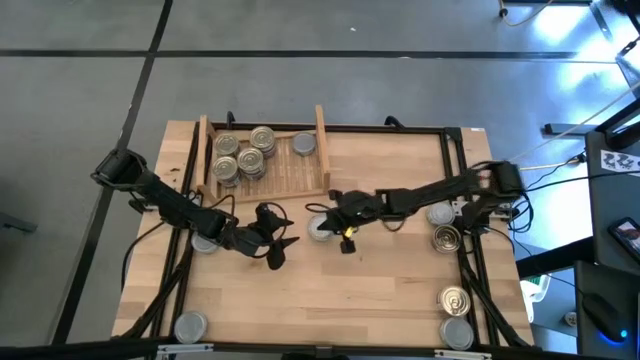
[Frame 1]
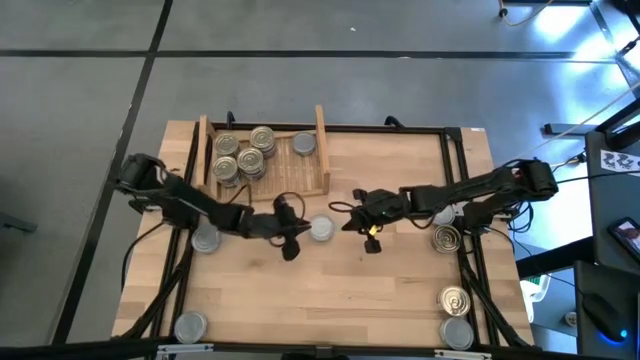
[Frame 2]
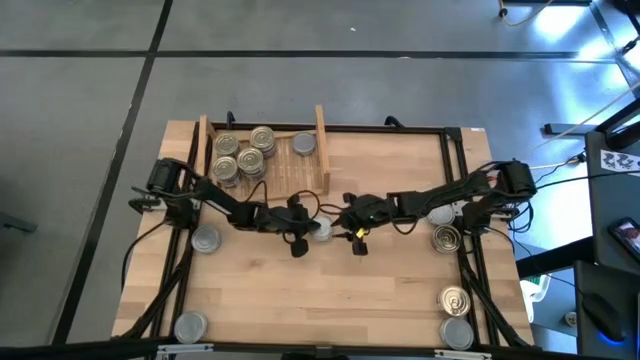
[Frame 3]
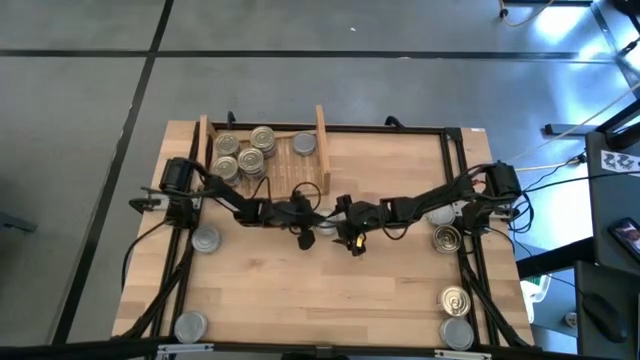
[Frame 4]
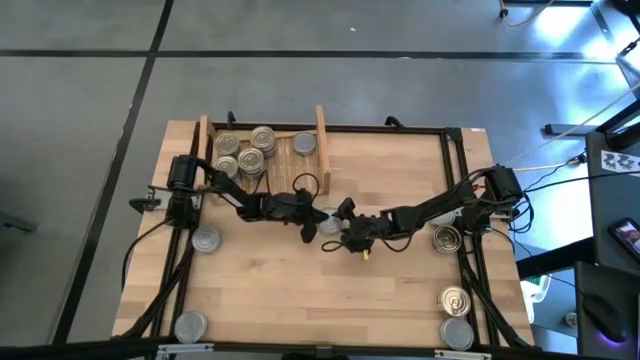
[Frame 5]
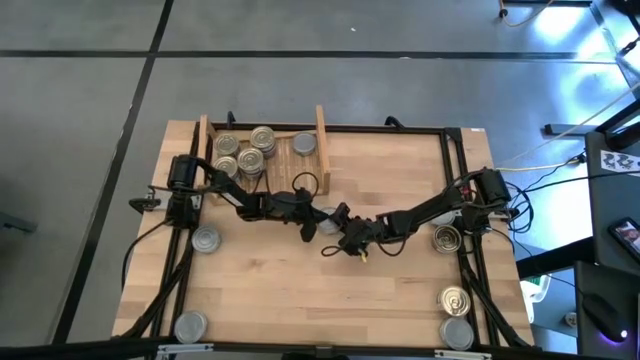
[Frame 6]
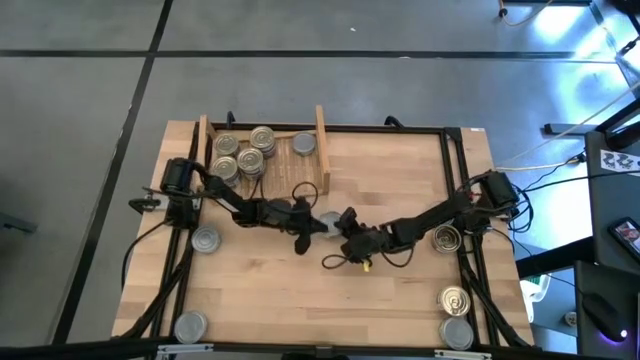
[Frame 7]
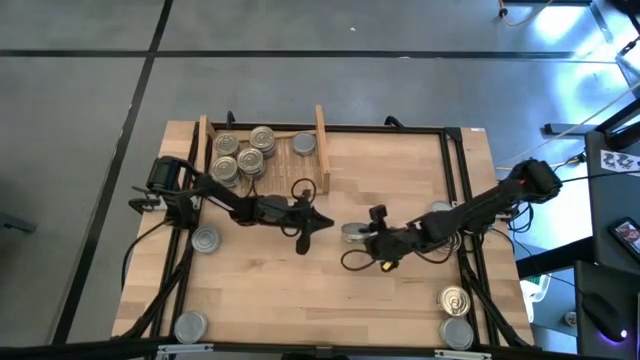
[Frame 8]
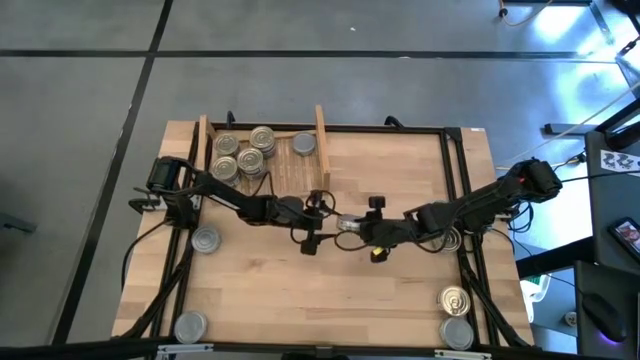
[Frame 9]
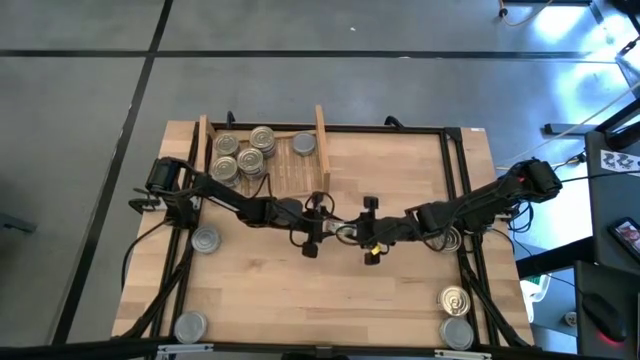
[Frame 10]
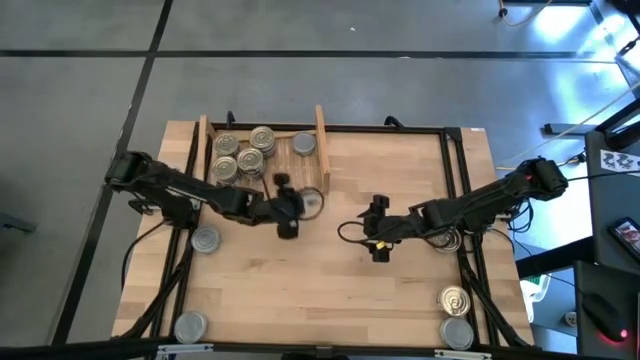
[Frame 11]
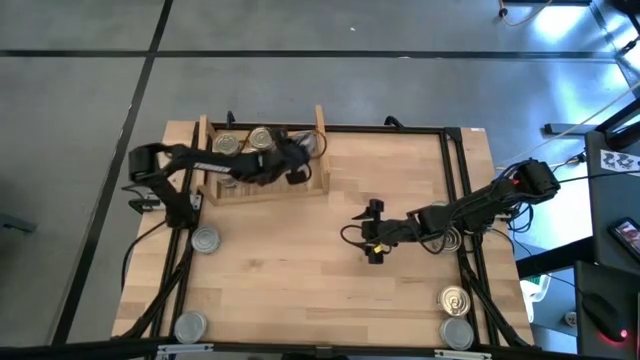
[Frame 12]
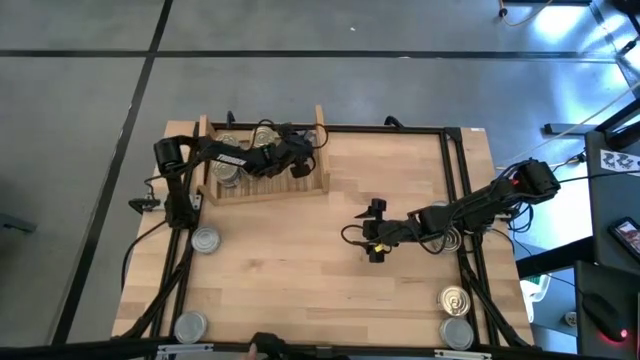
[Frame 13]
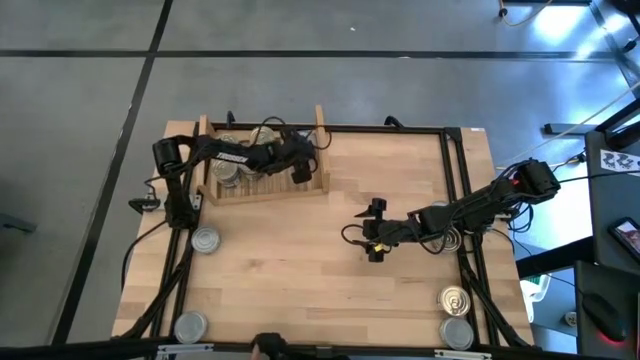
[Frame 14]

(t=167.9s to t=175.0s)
Task: Stack canned seafood by type on shelf
Stack the green tuna can on top of the other green tuna can on the shelf

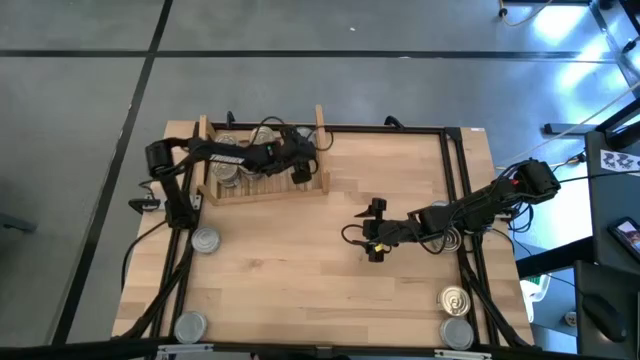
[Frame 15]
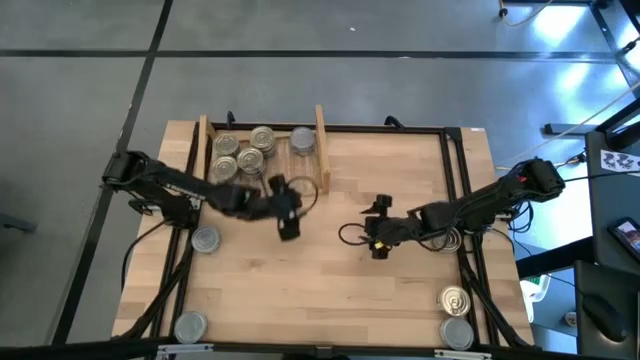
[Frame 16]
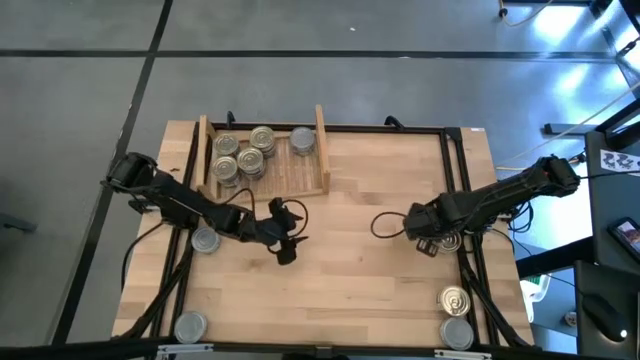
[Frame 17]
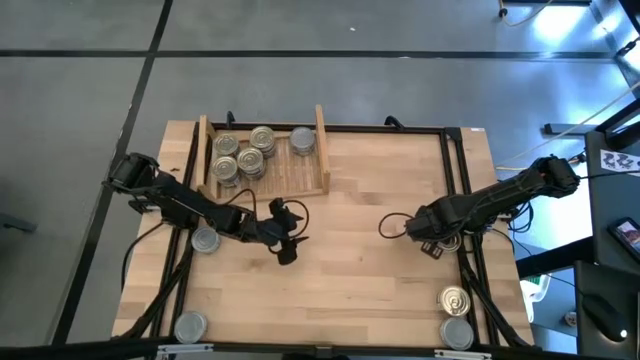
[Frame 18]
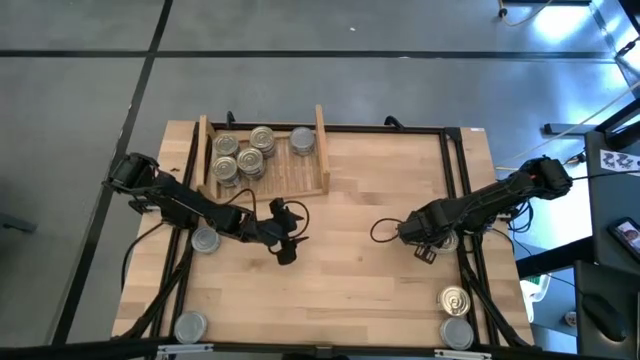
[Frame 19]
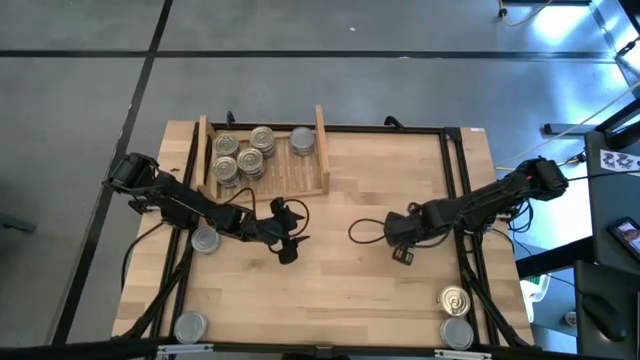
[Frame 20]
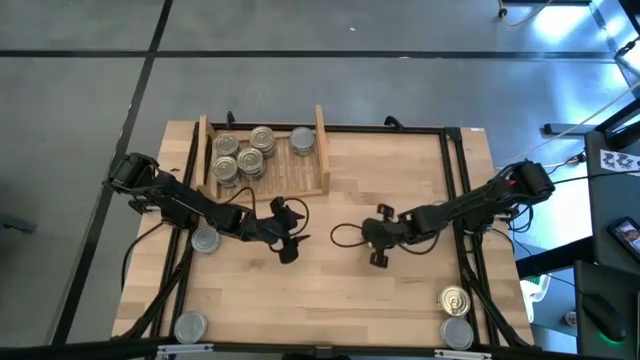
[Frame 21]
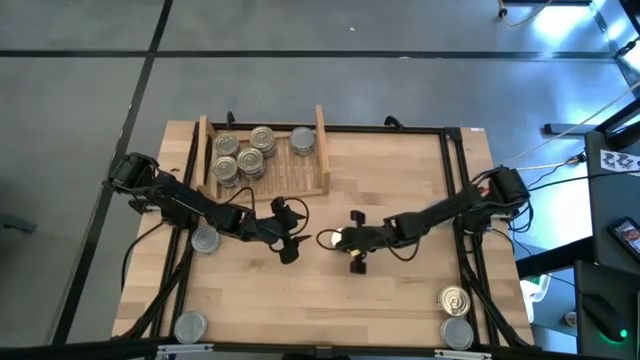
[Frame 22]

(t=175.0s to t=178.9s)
Move the blue tuna can from the middle right to the center

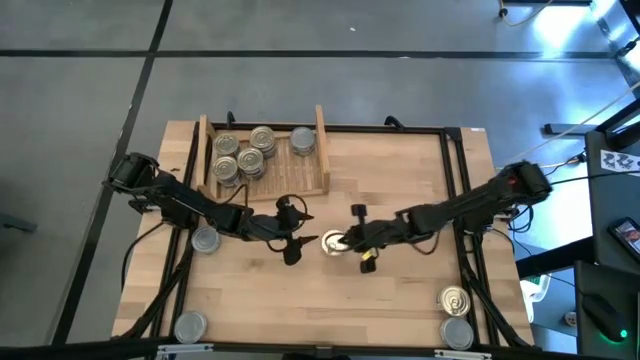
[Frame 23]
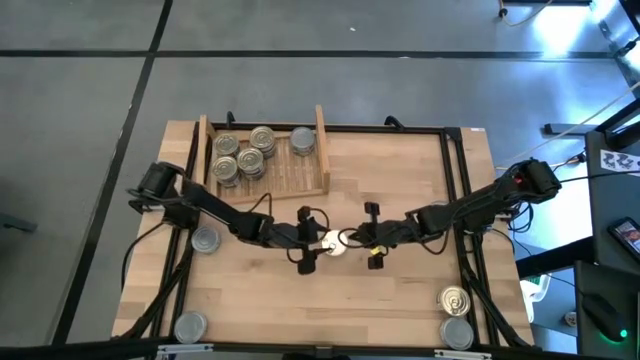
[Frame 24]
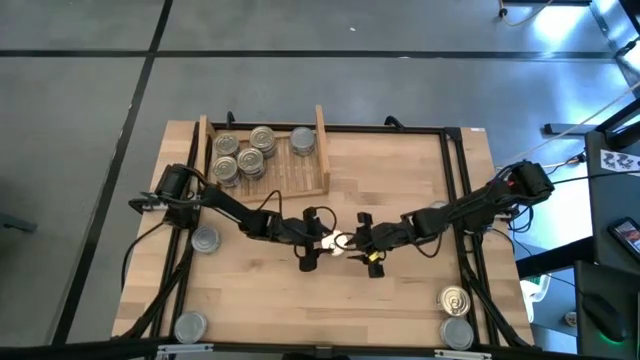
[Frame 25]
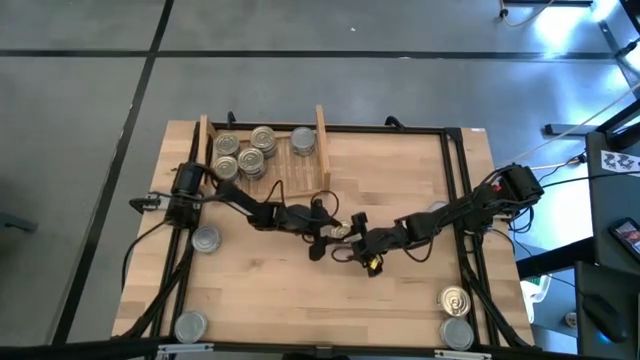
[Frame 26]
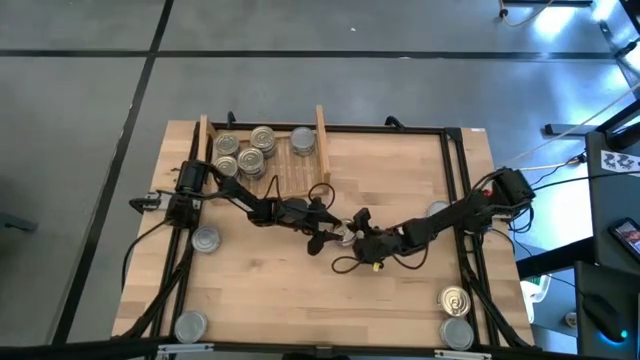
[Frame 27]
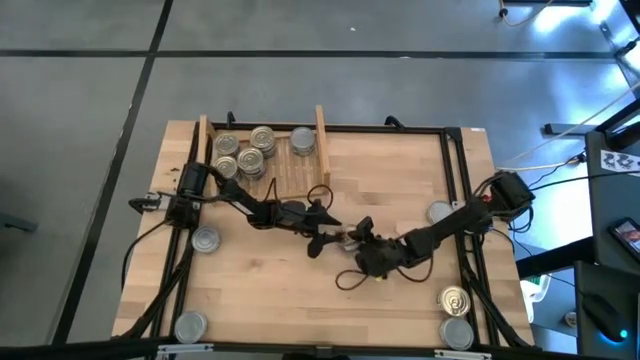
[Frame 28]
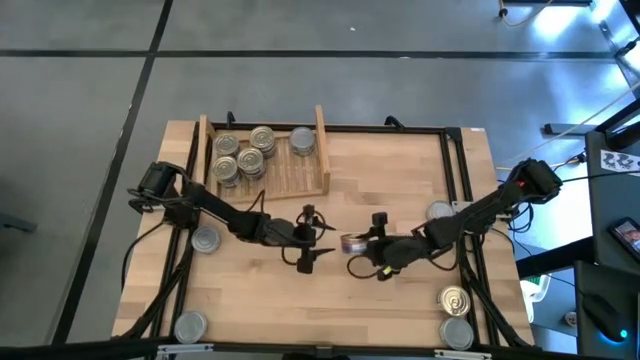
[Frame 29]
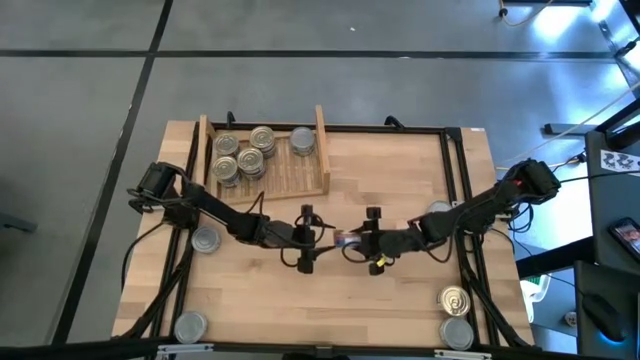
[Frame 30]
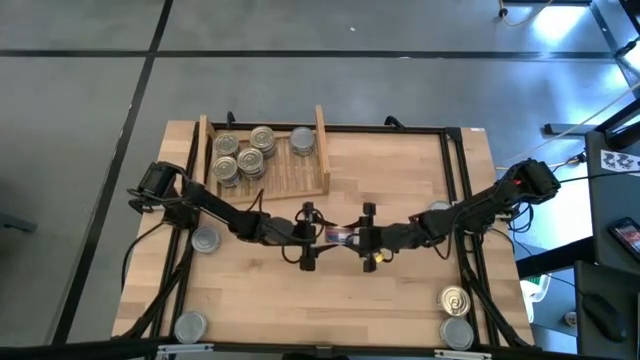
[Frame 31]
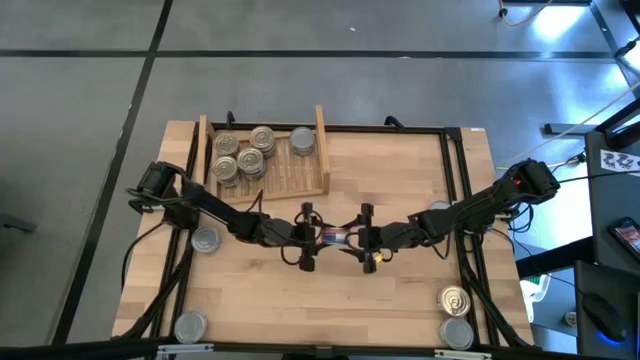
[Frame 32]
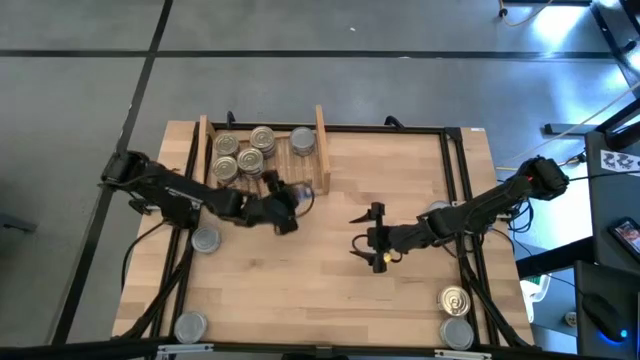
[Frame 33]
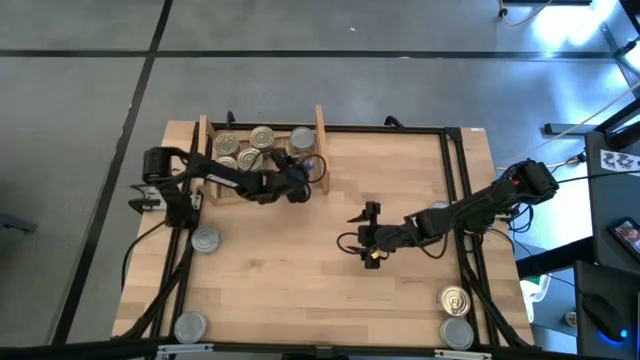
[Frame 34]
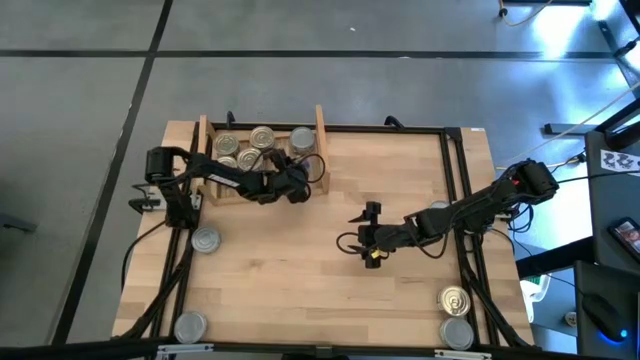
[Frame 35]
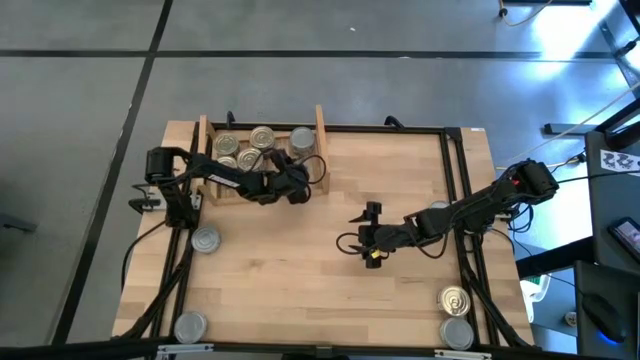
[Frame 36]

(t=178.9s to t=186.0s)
Put the blue tuna can on the shelf

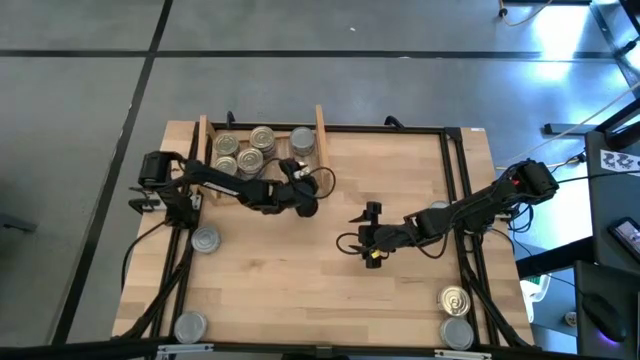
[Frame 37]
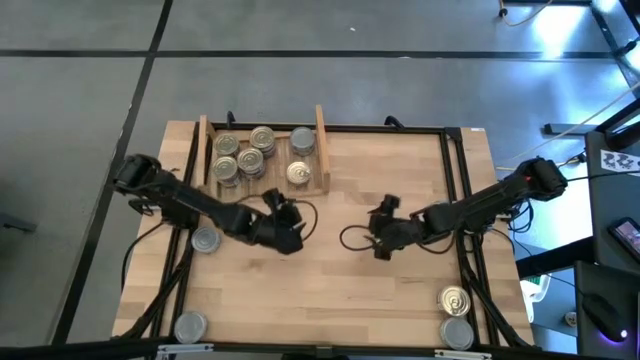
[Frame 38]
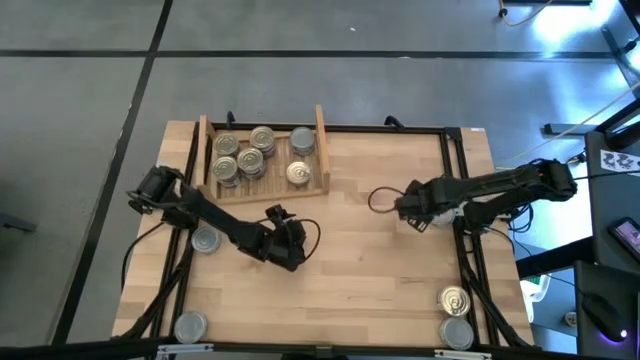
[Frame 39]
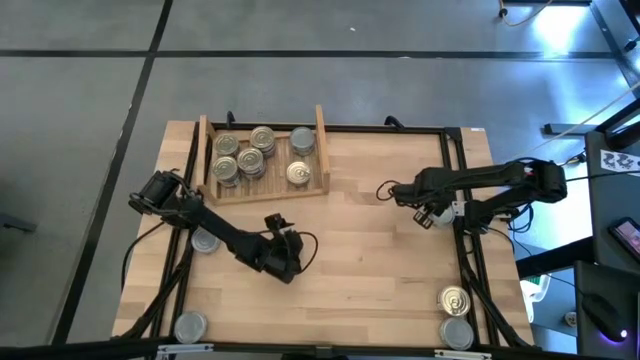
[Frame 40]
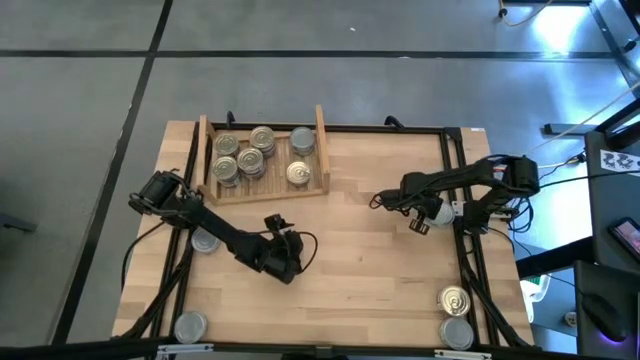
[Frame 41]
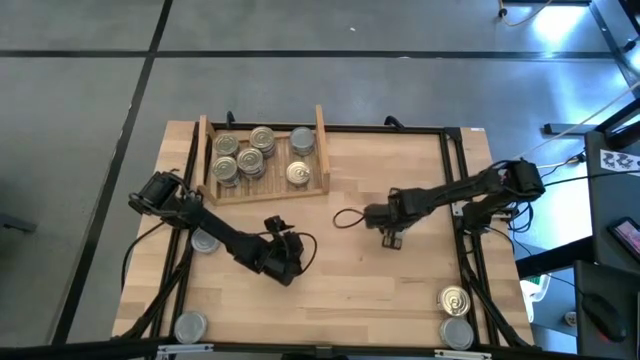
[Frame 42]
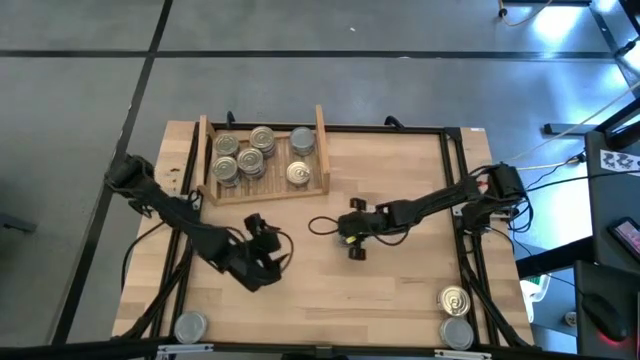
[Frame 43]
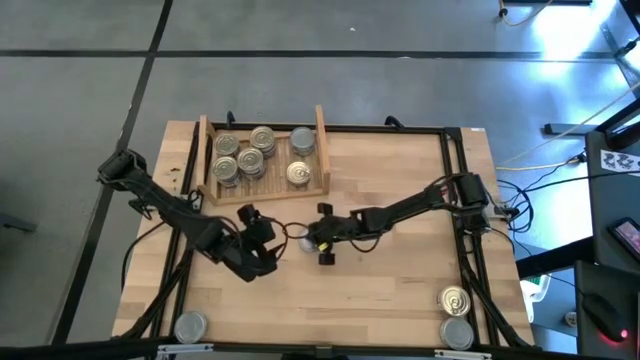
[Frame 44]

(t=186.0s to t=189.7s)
Move the green tuna can from the middle right to the center
